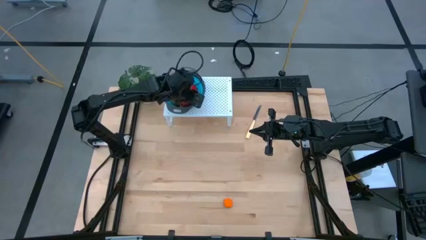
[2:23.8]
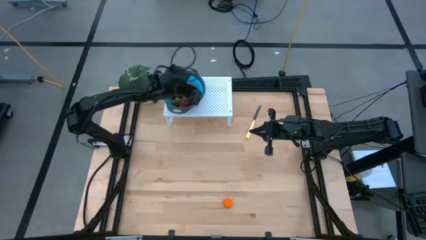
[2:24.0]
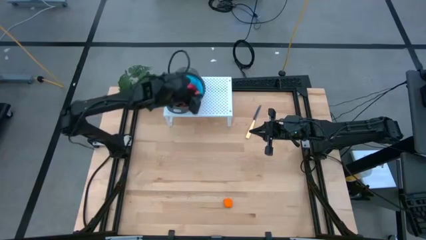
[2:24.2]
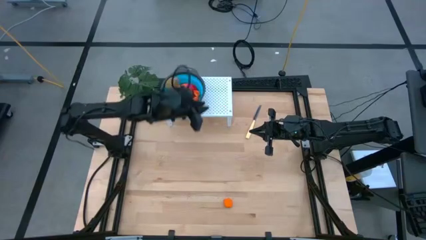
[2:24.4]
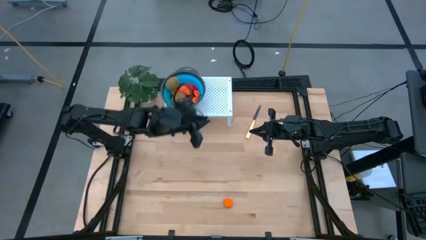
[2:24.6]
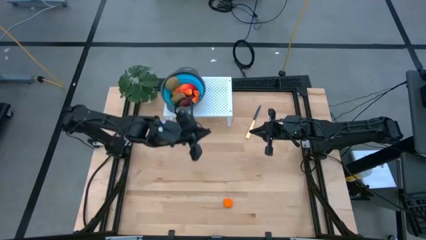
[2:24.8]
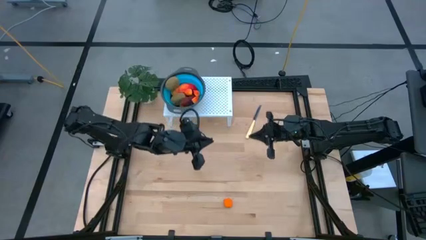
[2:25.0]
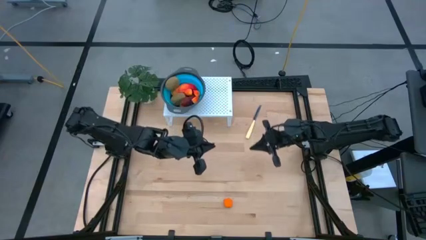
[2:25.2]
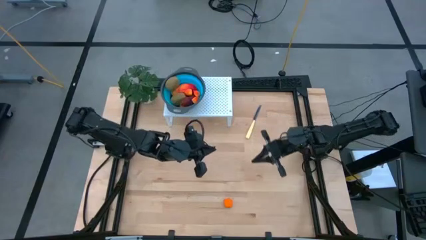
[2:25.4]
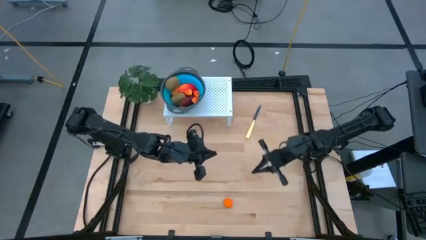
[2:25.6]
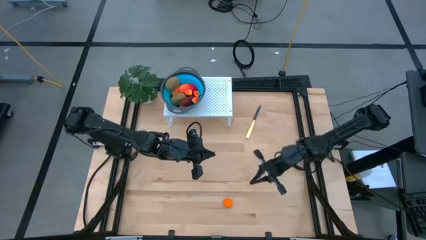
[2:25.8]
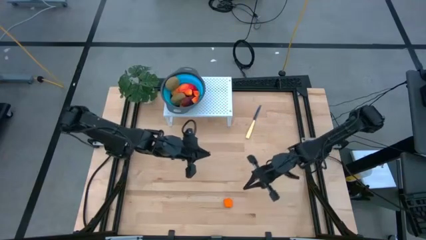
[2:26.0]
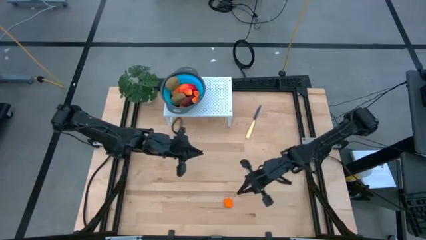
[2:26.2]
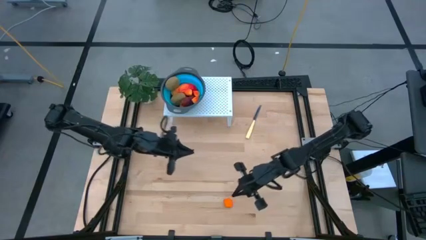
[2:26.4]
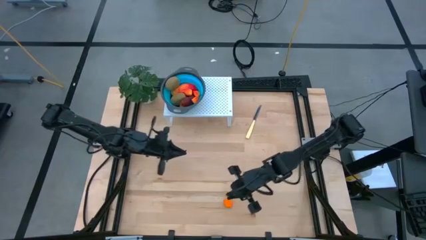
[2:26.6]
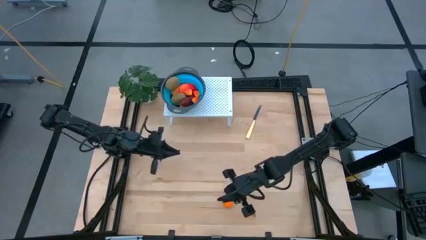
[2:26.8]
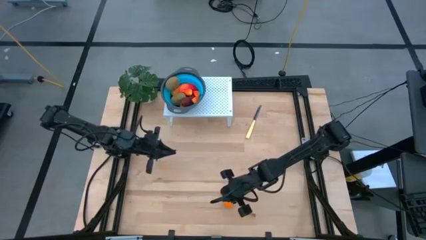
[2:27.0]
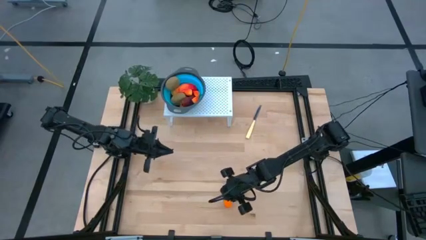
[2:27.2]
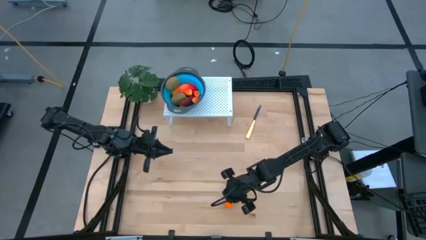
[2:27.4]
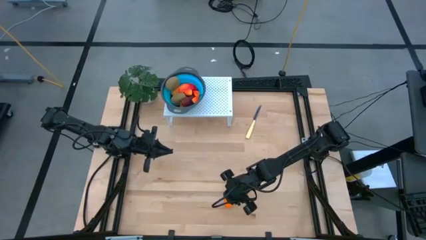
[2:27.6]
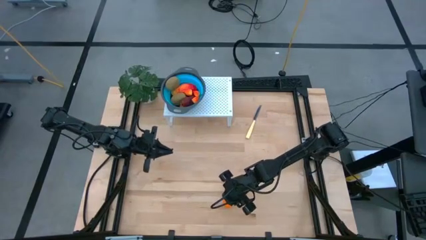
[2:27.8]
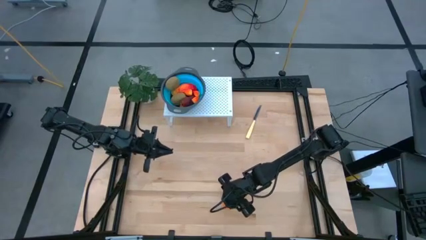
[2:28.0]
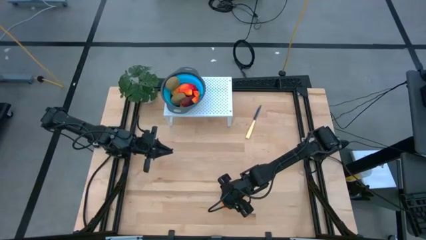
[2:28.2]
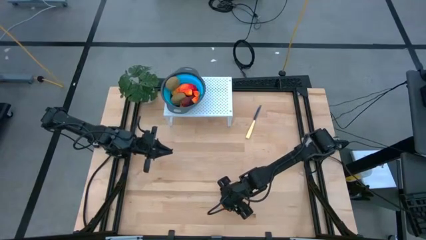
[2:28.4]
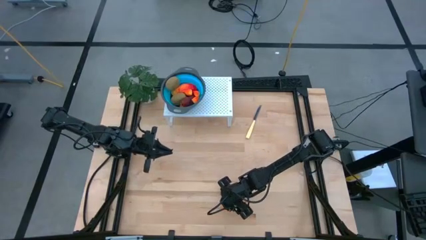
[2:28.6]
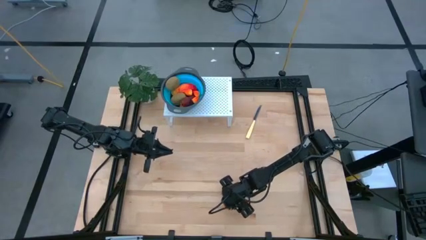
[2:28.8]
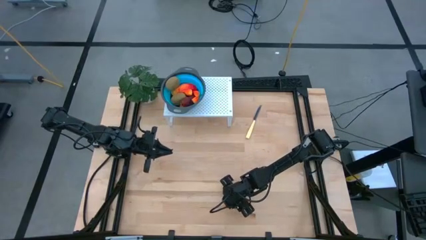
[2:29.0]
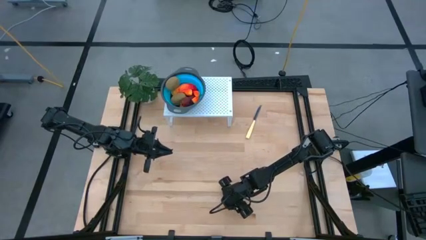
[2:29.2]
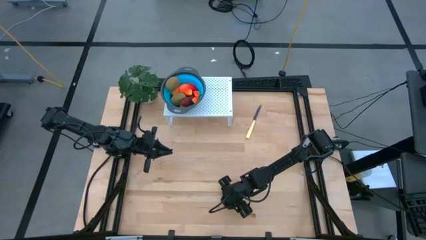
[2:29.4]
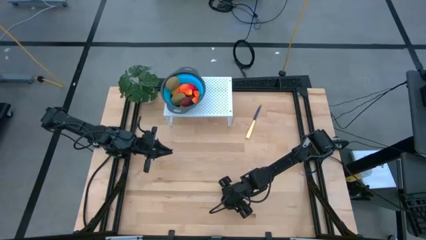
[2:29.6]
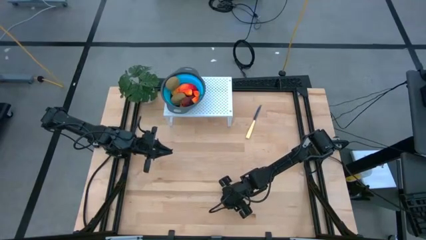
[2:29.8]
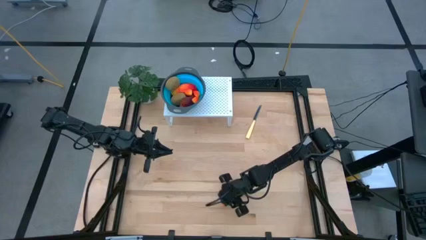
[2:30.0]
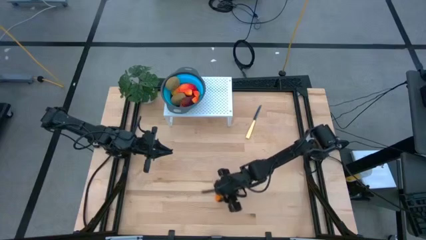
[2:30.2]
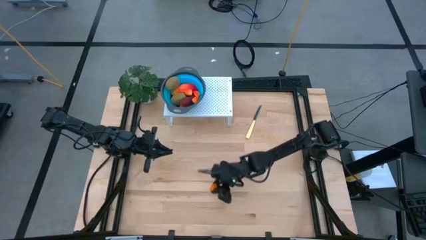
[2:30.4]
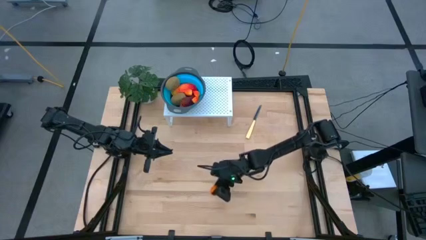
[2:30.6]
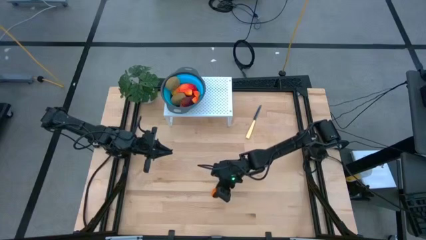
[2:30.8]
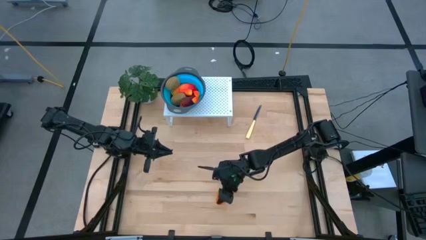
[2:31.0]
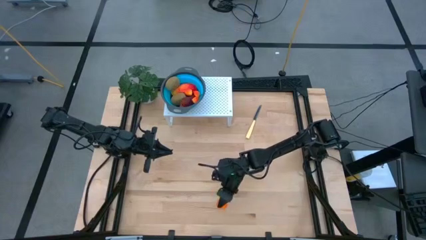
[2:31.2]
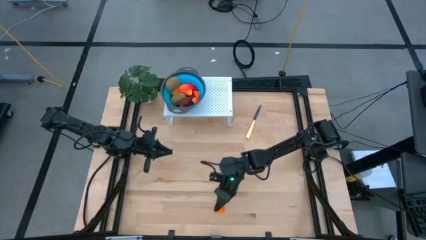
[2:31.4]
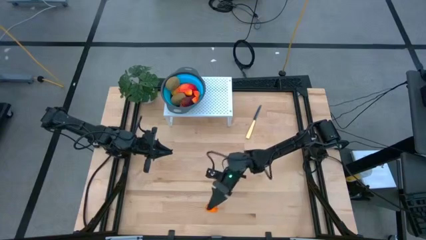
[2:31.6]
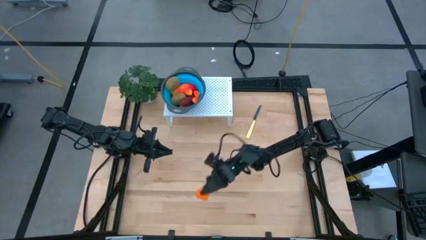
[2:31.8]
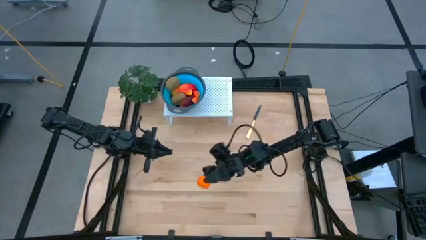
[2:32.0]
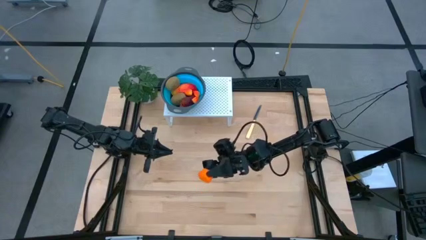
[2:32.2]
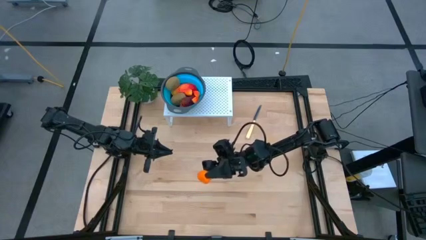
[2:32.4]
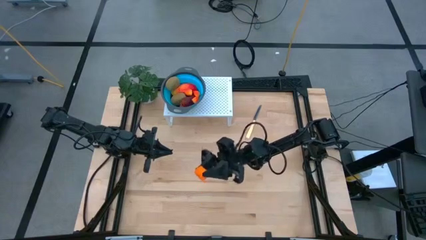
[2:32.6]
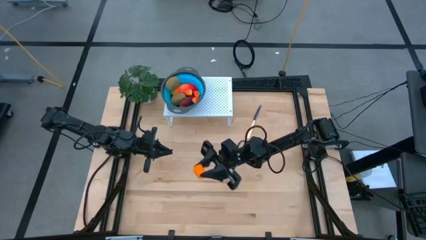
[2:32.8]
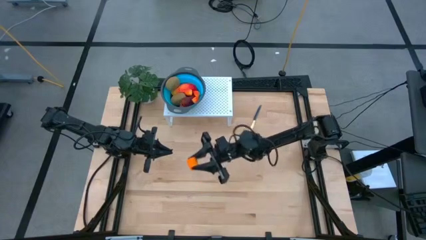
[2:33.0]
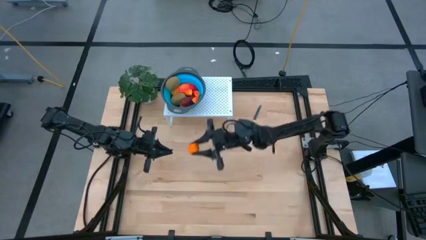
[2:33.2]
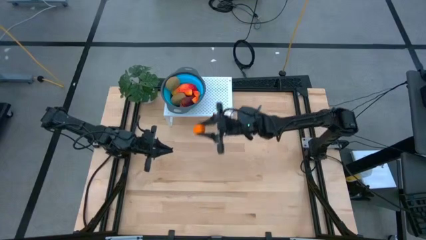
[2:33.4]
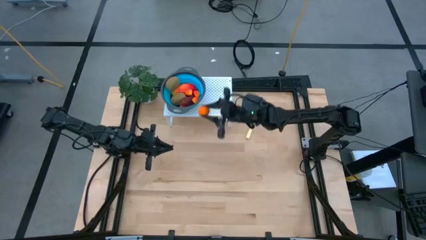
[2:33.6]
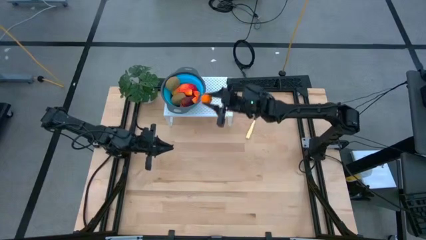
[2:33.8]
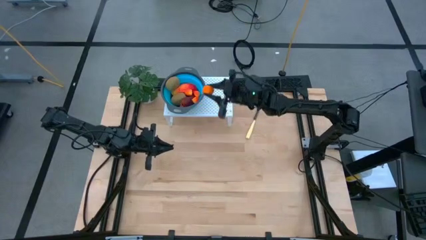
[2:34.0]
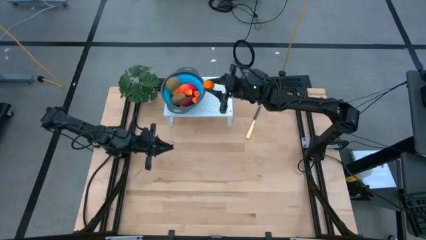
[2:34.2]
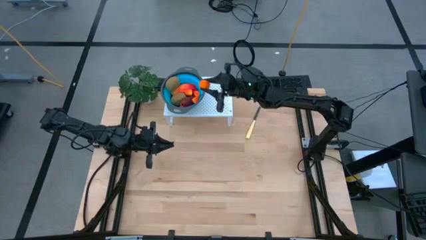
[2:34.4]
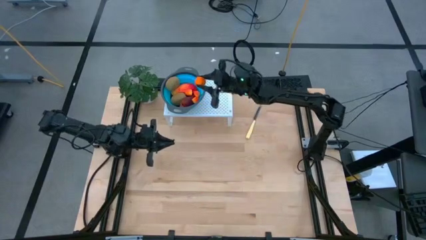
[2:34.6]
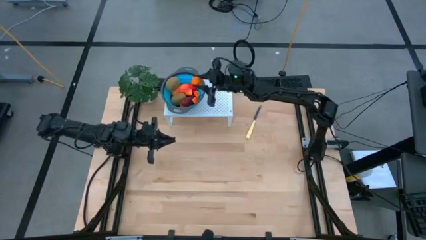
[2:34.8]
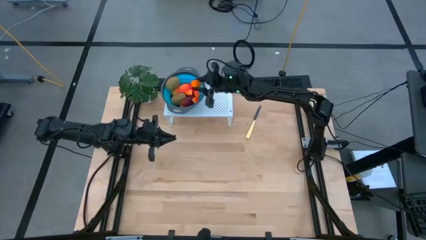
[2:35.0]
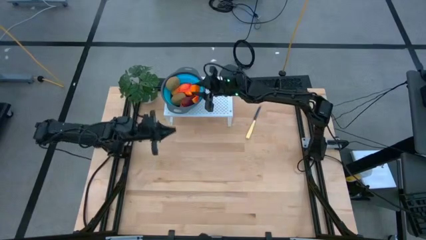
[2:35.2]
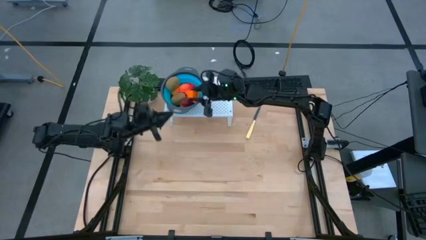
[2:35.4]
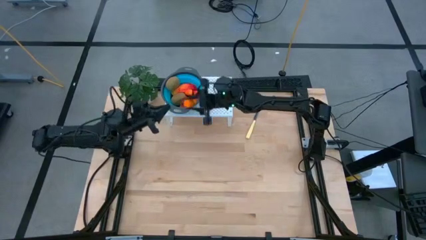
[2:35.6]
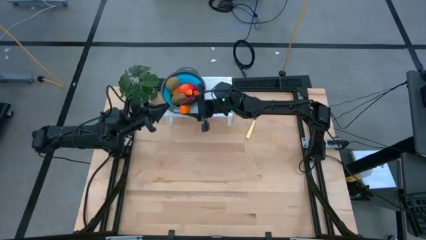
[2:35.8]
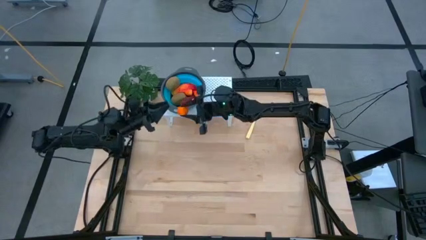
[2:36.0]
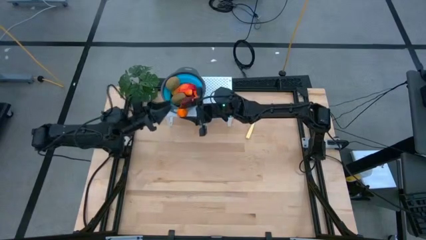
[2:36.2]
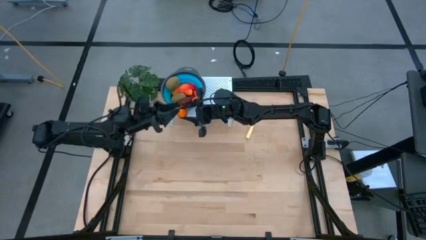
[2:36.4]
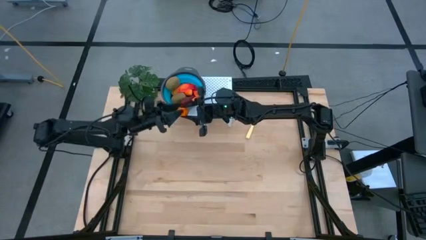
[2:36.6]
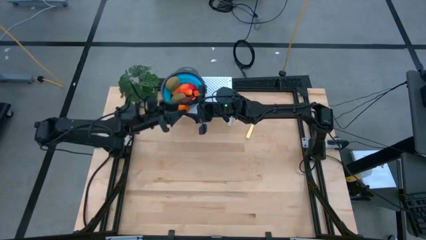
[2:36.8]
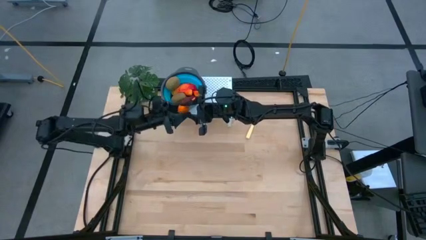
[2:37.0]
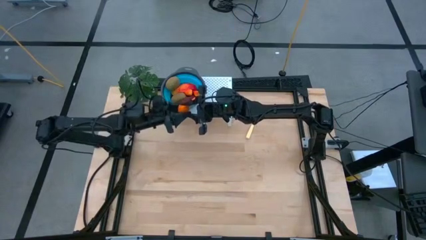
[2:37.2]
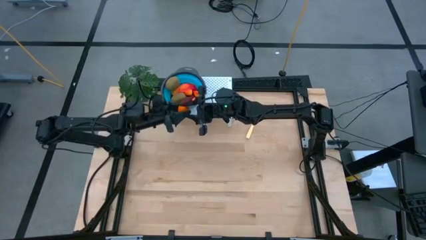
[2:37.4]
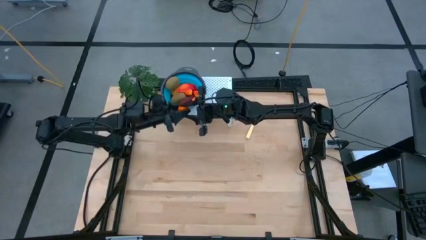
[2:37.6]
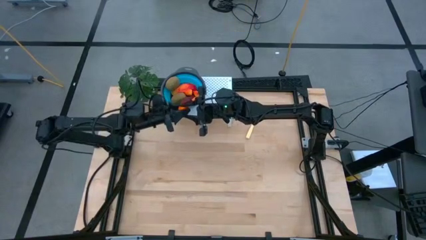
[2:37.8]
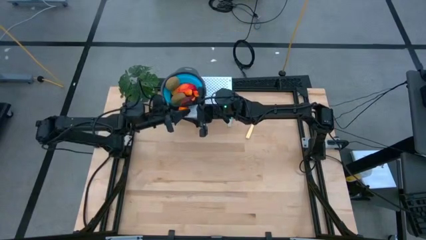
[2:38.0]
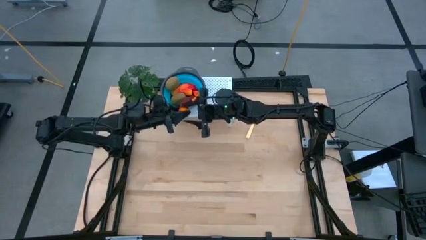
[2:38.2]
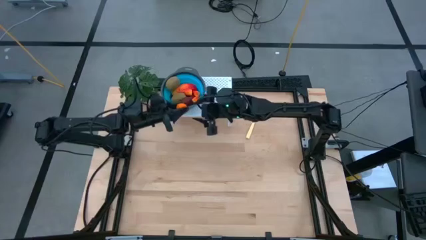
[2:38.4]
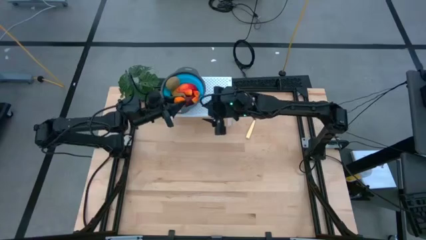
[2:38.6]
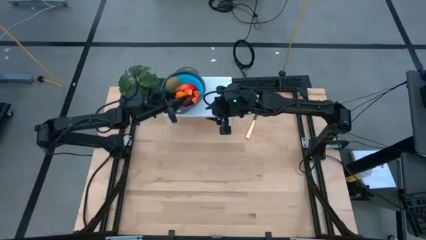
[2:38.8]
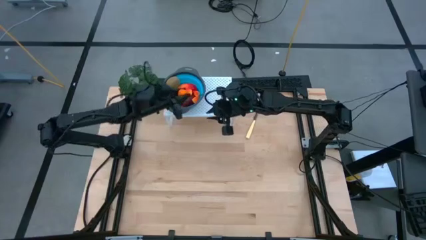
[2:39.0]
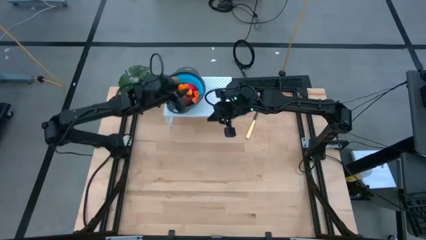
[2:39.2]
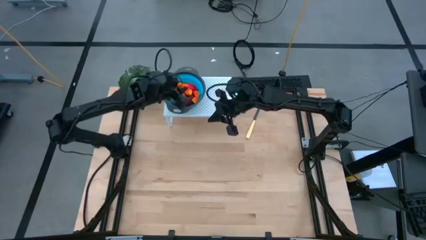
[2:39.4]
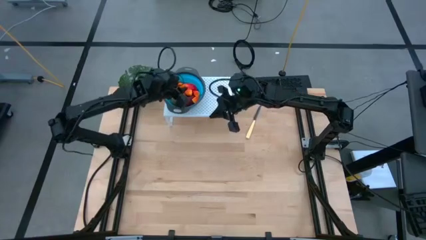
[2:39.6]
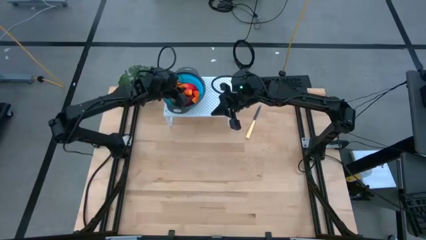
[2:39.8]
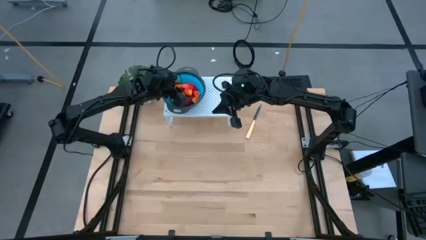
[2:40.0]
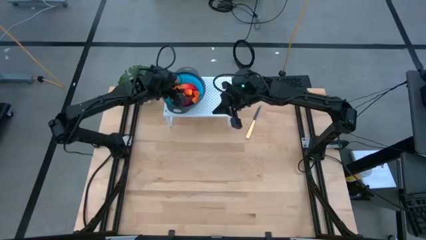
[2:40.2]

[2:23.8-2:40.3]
Task: Pick & Place Fruit
Put the peas into the strainer bowl on the shelf
